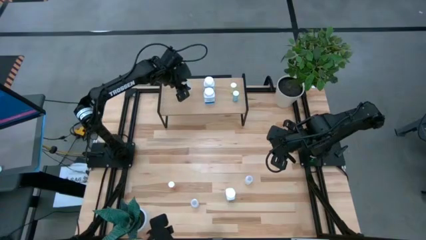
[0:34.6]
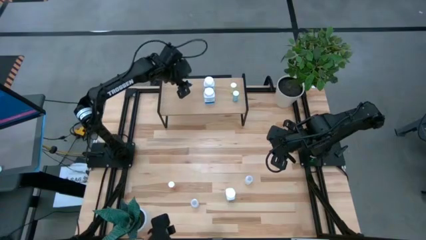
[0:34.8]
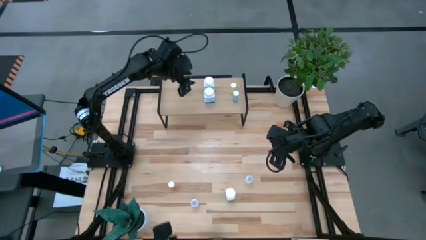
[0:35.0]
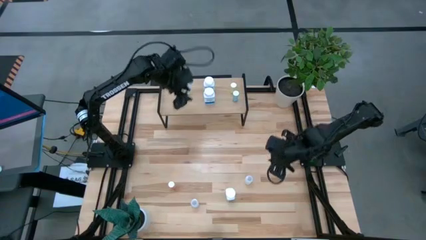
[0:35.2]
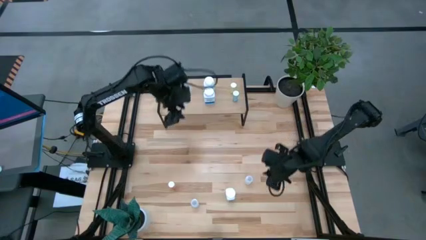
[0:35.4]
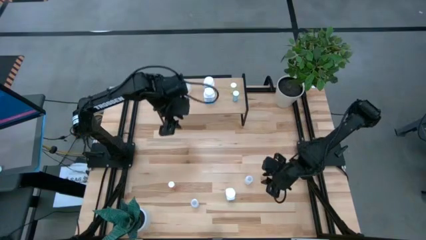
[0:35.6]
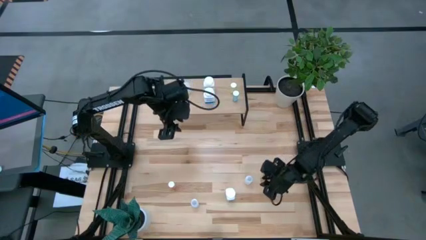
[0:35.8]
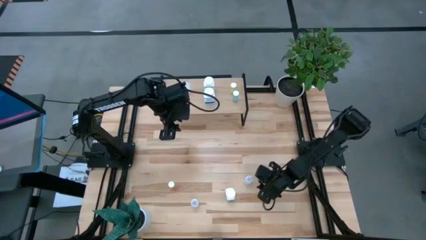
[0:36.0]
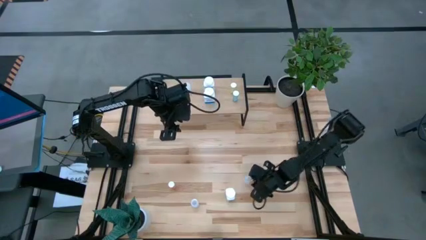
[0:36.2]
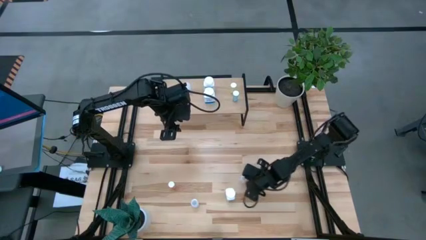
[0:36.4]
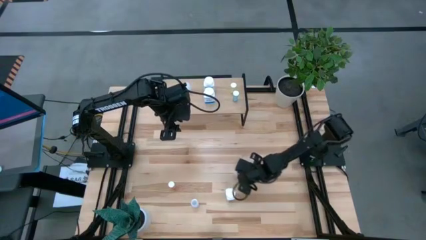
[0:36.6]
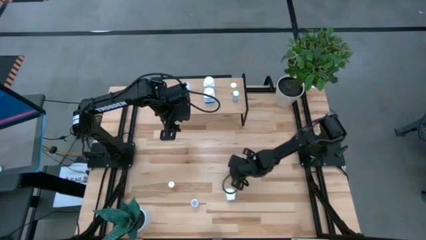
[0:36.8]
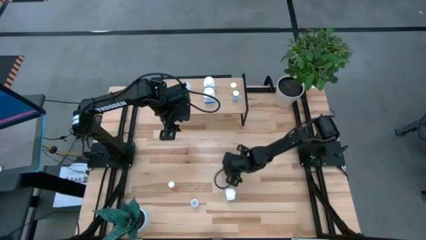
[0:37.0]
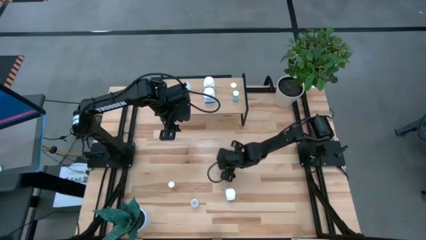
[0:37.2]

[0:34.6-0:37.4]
Task: Pick and place medicine bottles onto shelf by color
Move the right white pill bottle to the center of the table

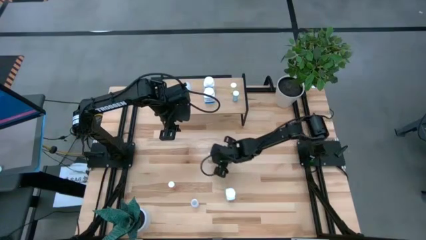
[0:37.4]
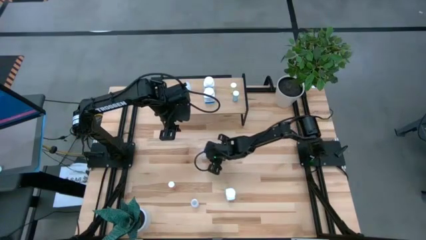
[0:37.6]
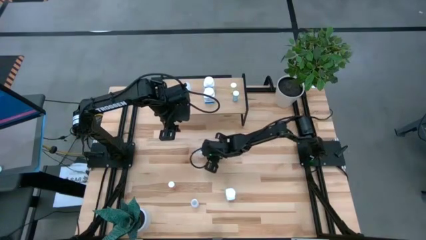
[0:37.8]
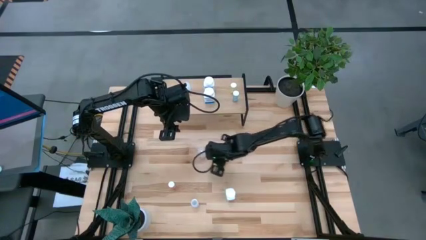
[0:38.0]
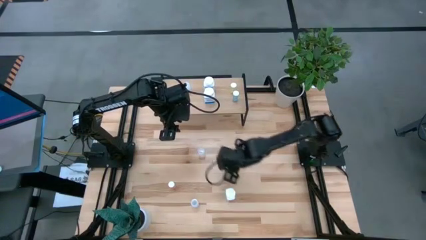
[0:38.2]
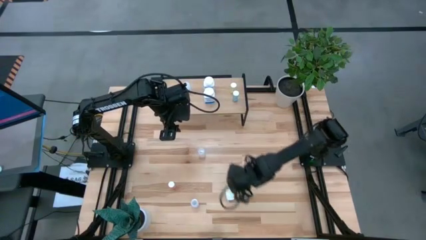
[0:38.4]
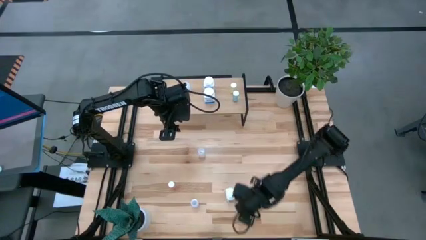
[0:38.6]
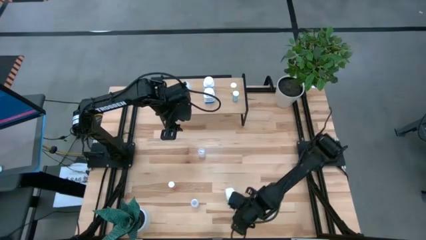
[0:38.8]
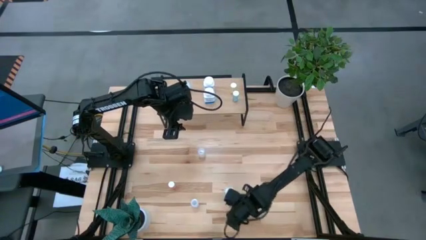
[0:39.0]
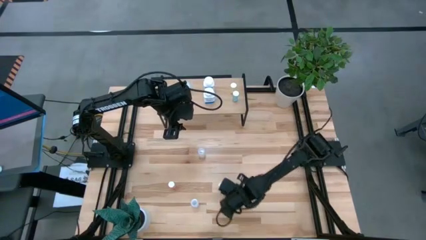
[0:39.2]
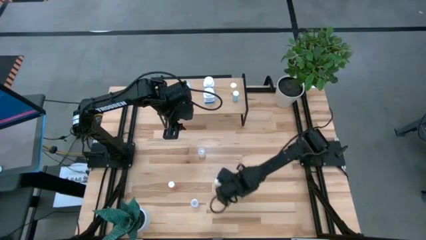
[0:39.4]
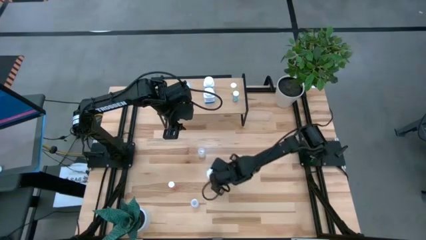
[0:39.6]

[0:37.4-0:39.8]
Move the white blue pill bottle to the center of the table

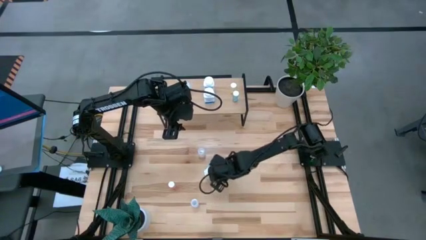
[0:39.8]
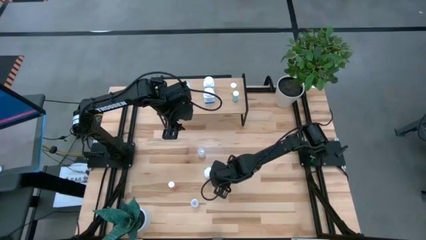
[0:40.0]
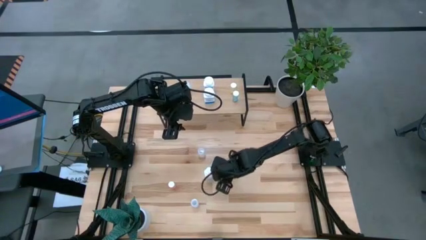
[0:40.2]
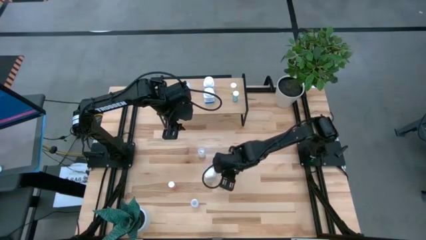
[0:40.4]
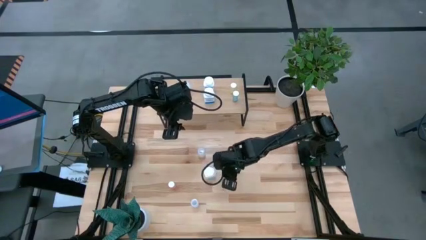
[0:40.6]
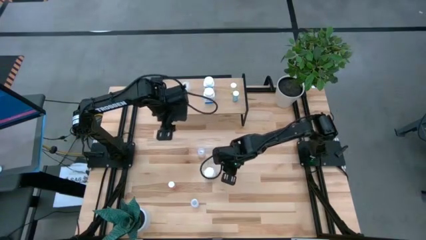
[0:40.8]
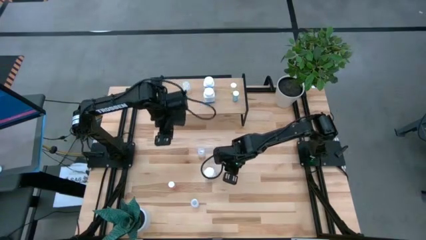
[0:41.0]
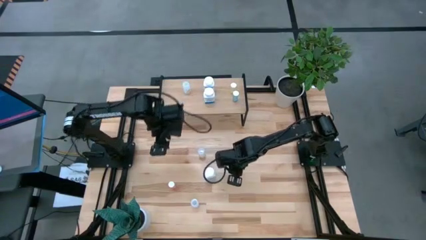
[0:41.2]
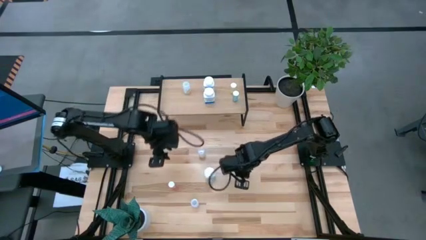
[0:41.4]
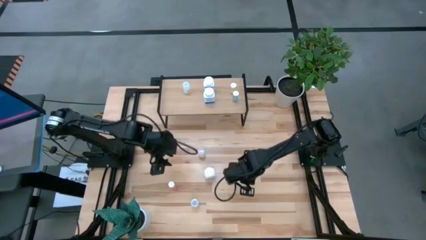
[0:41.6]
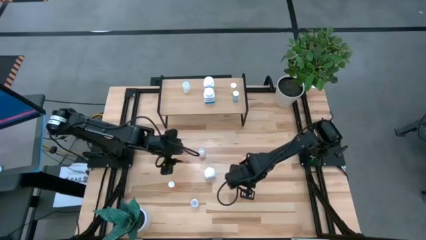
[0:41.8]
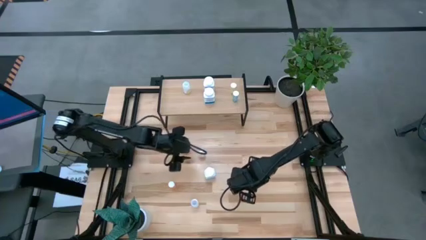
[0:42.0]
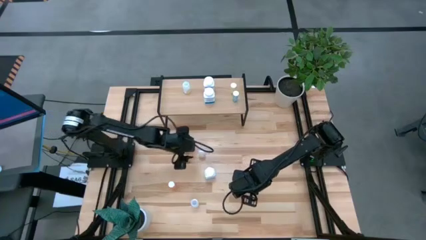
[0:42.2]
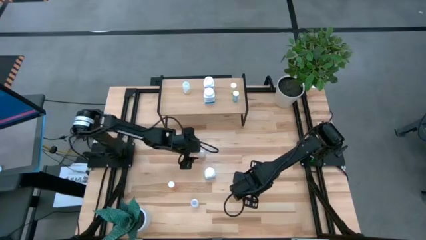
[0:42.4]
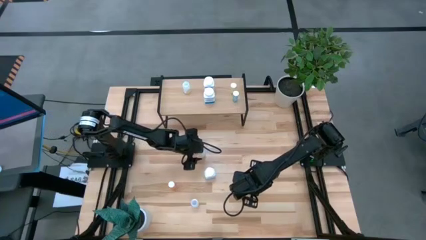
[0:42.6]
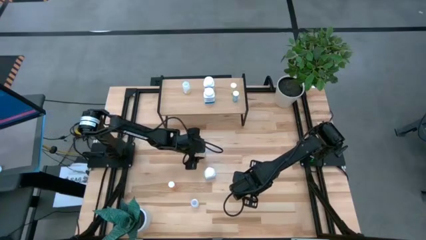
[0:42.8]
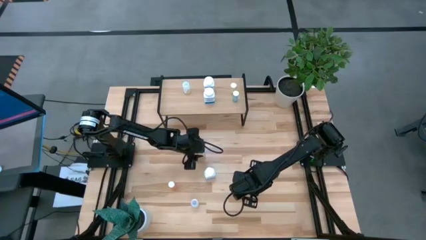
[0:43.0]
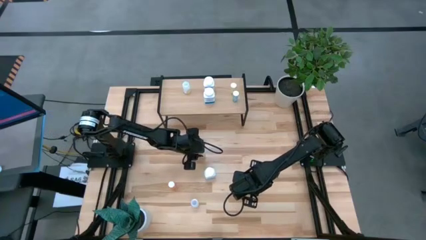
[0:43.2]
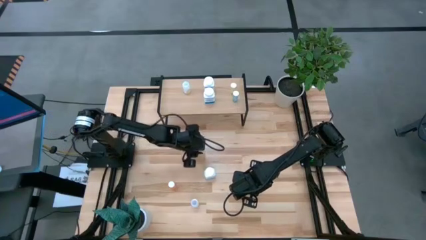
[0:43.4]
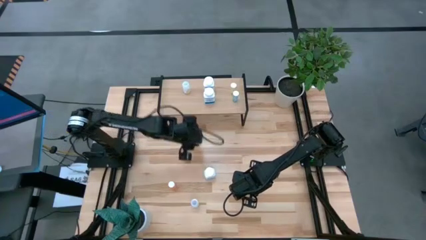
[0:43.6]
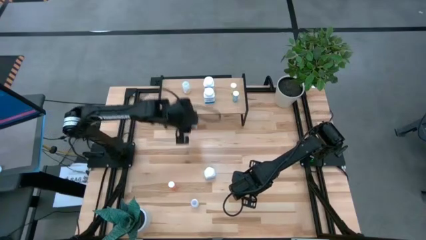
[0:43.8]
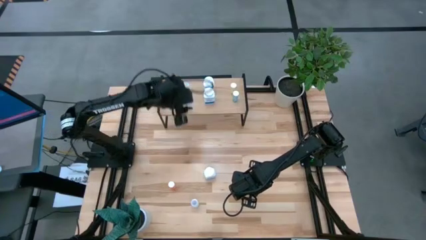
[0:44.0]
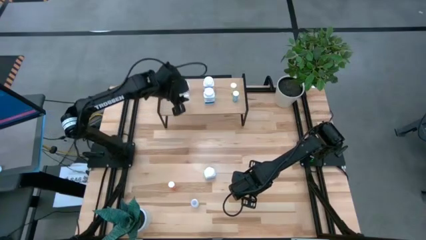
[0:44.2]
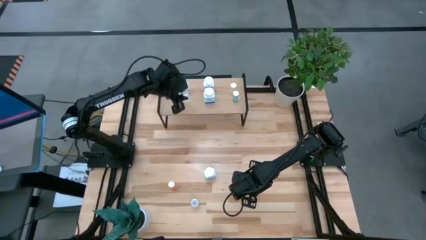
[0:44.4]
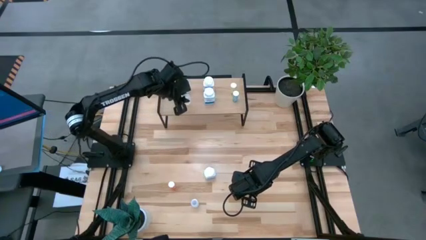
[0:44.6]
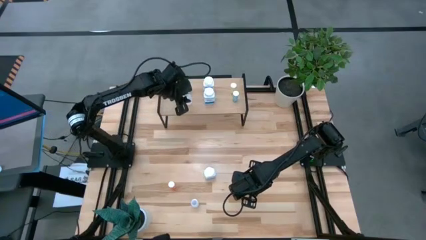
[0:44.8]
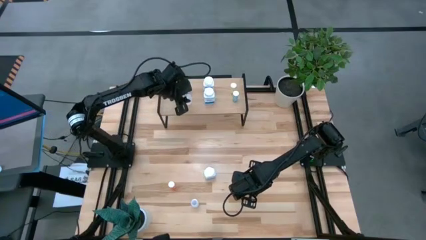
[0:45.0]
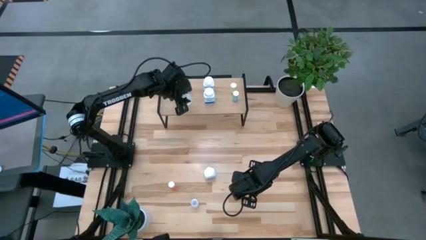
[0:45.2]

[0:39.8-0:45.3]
Put the top white pill bottle on the shelf and align it with the other white pill bottle

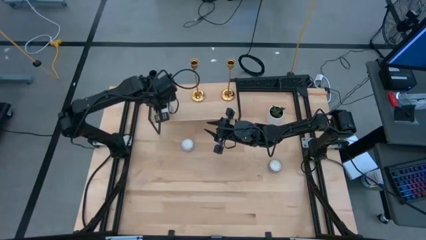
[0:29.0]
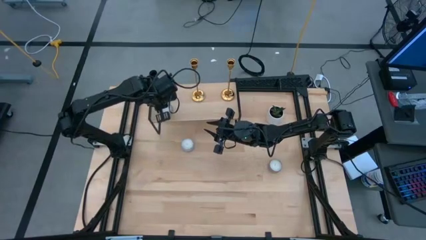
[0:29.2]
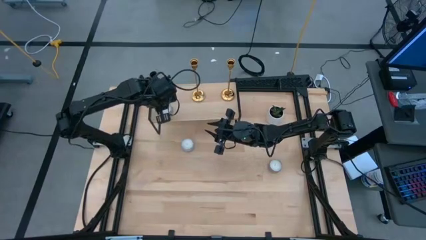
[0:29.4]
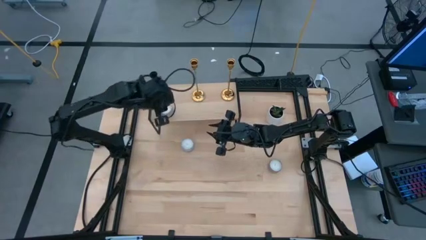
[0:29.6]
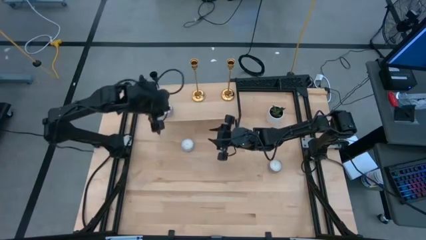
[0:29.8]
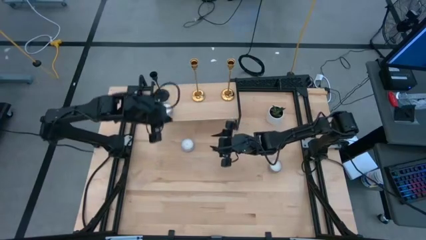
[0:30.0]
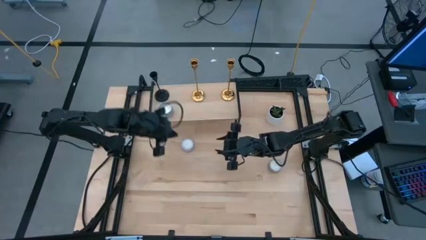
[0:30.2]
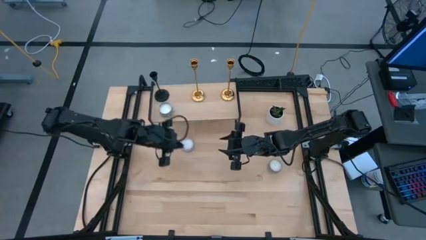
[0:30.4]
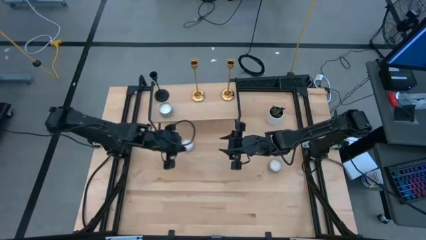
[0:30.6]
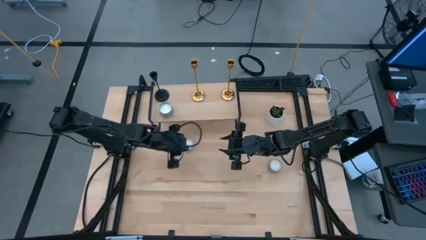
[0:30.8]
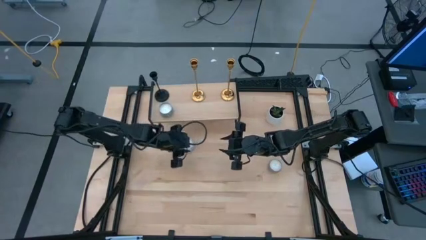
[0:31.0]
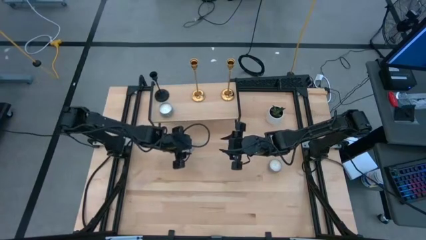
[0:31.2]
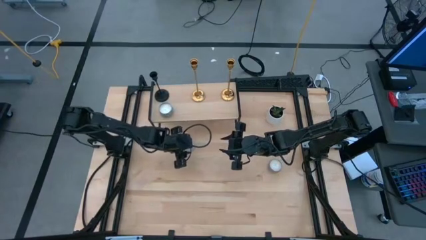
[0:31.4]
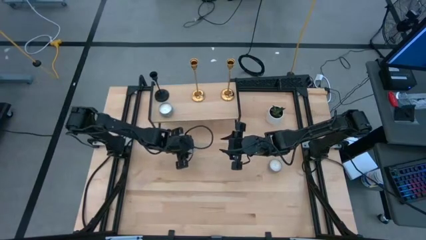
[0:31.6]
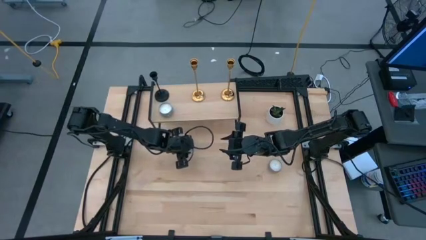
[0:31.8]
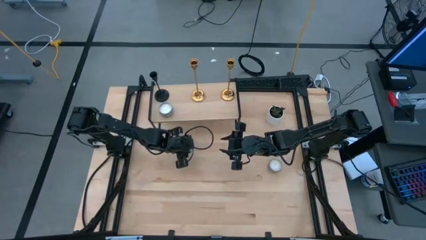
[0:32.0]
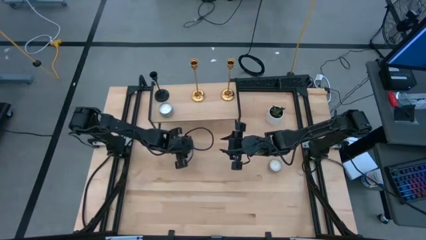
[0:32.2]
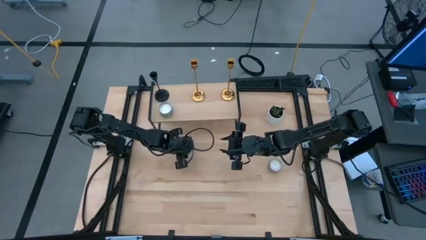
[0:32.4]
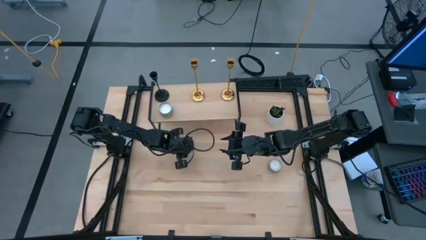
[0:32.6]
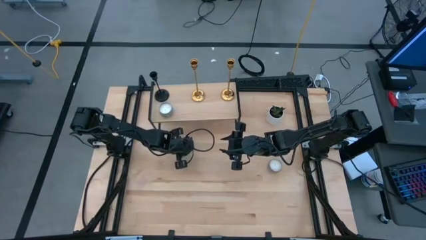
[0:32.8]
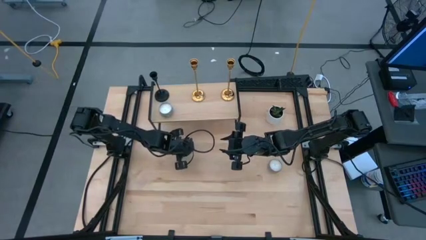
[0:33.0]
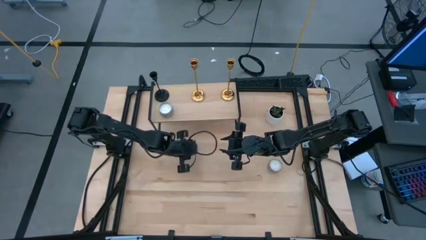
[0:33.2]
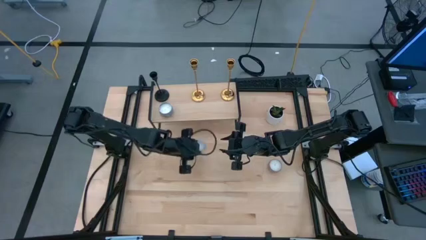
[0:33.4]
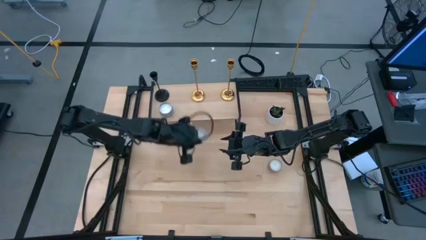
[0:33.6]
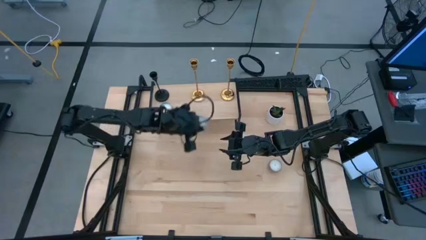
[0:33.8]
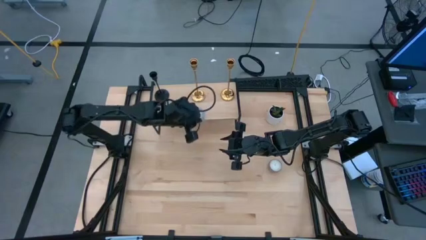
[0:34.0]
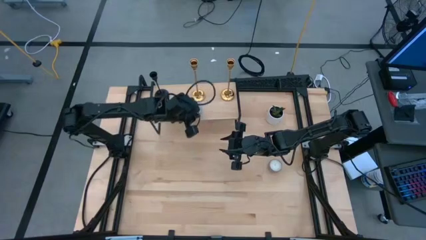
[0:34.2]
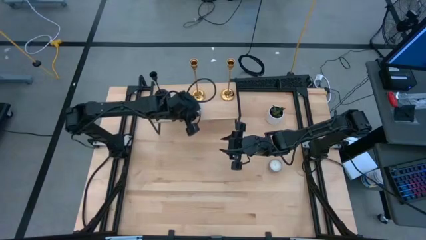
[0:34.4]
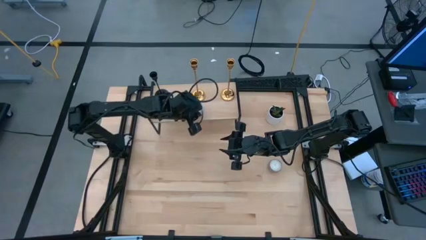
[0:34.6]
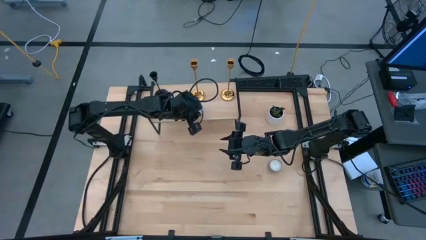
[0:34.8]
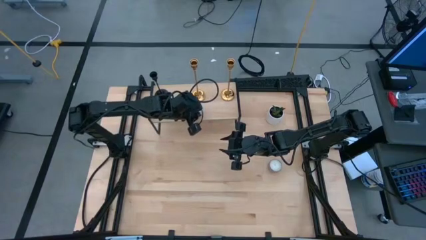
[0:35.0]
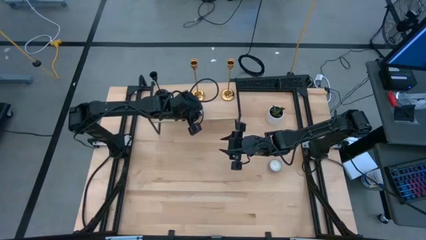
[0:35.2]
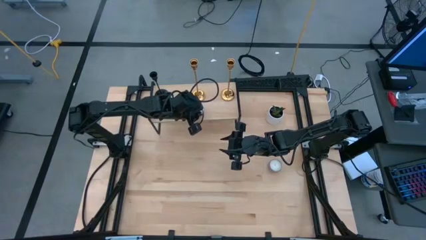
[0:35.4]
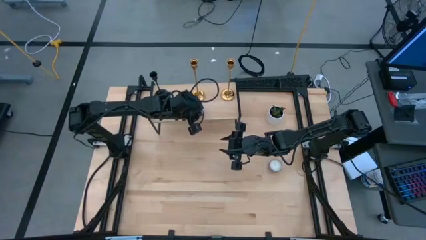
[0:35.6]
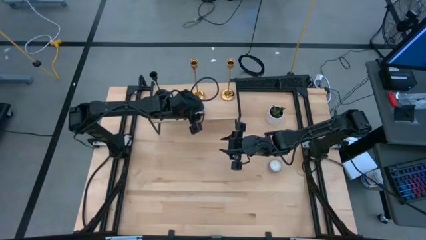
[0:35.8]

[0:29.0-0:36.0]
Task: Pick & Place candle stick holders
Put the white patterned scented candle on the shelf
